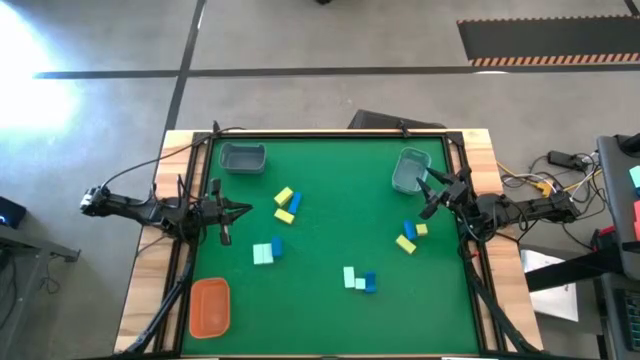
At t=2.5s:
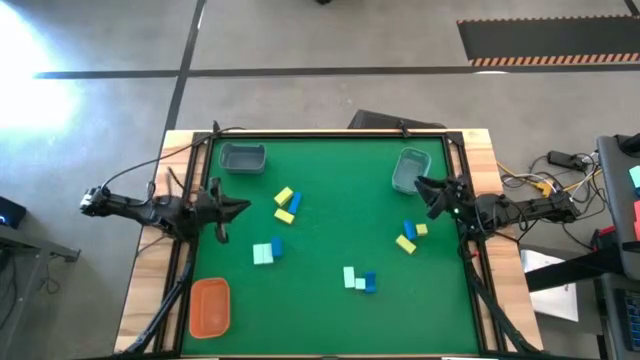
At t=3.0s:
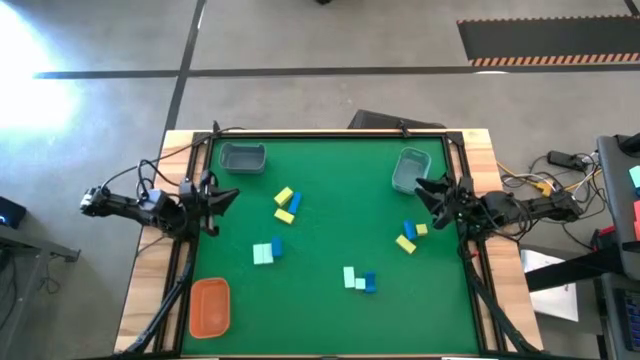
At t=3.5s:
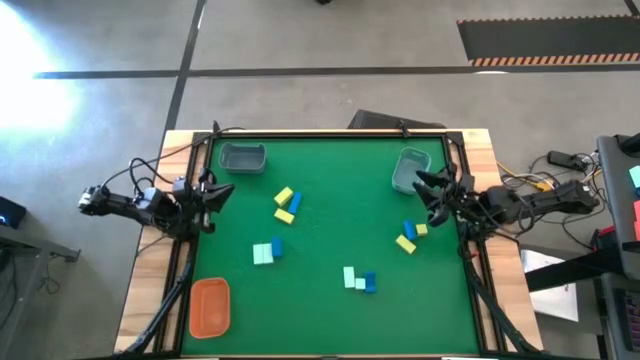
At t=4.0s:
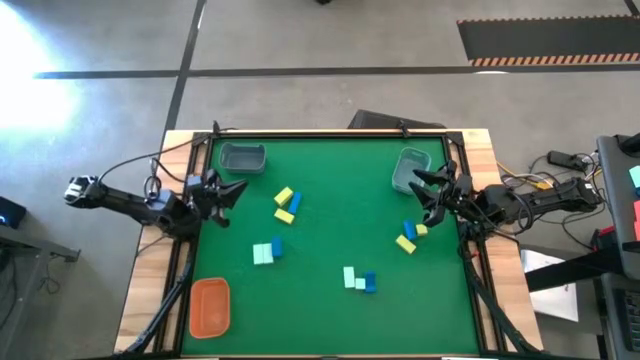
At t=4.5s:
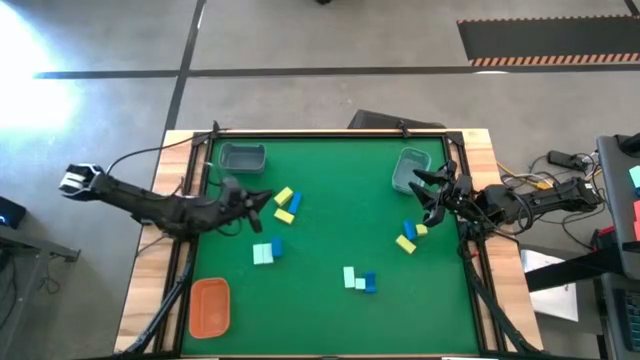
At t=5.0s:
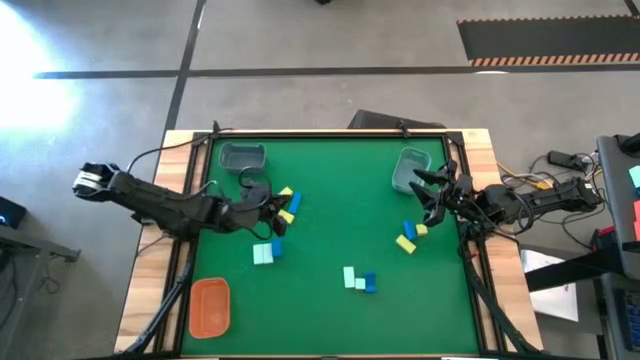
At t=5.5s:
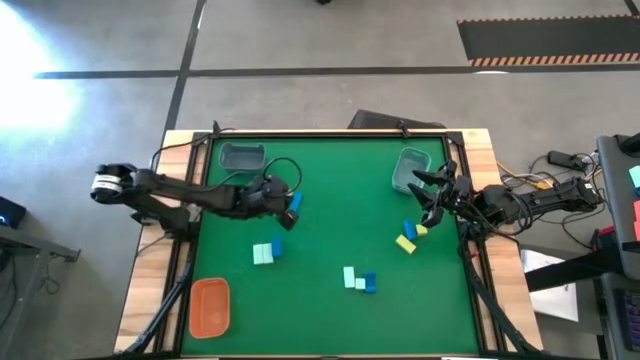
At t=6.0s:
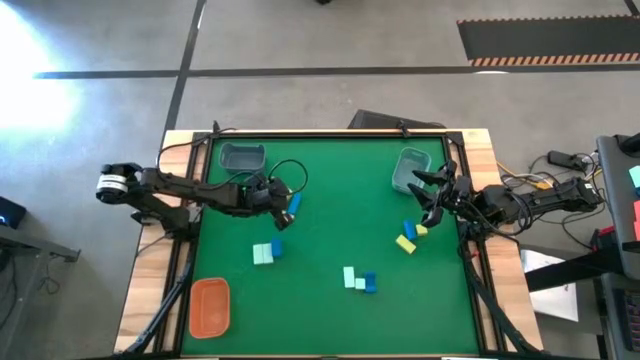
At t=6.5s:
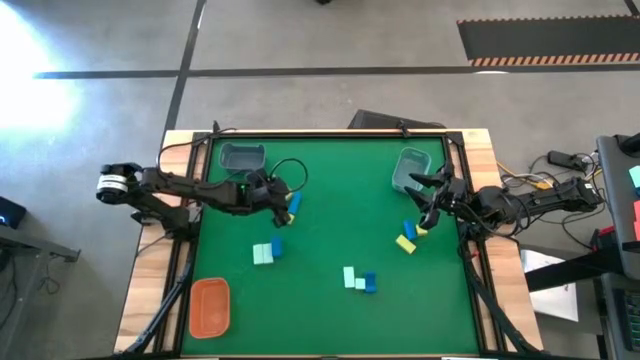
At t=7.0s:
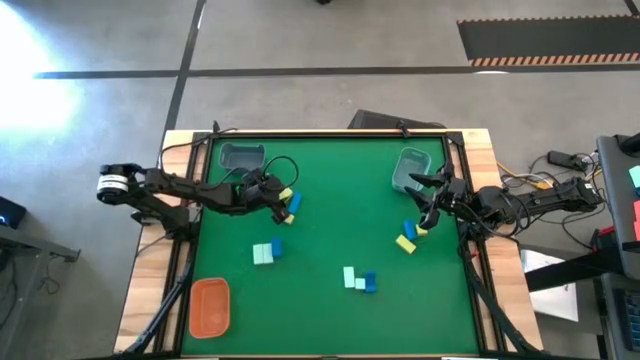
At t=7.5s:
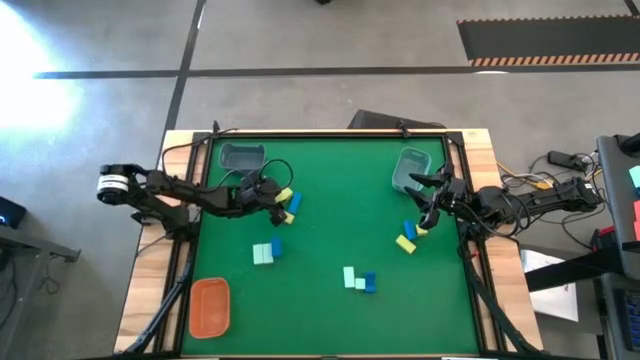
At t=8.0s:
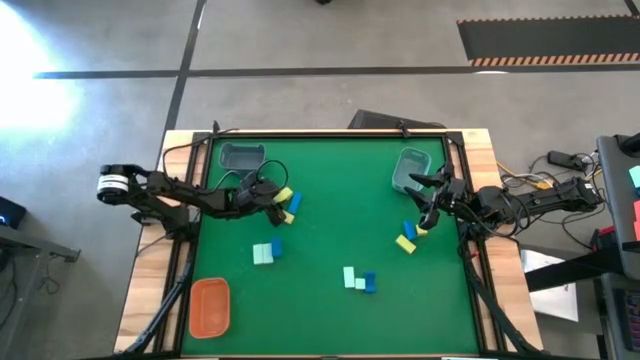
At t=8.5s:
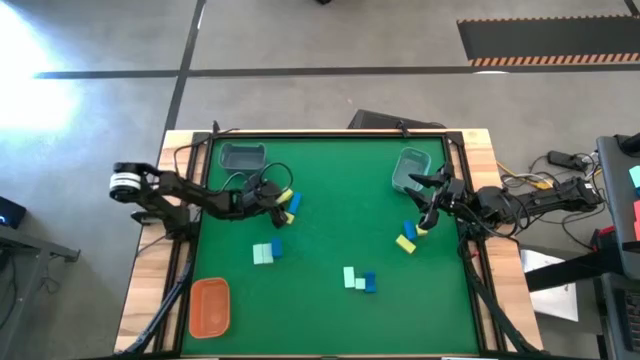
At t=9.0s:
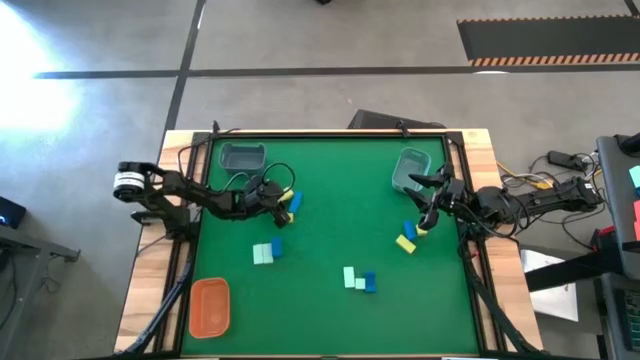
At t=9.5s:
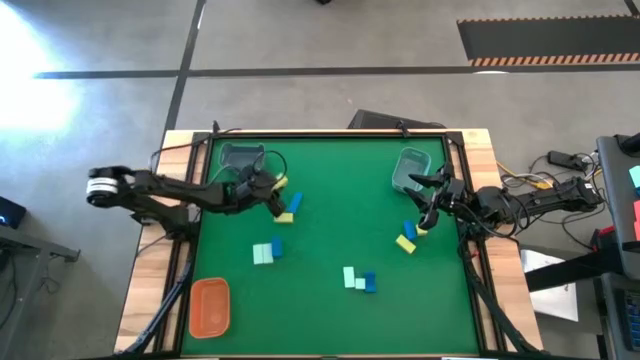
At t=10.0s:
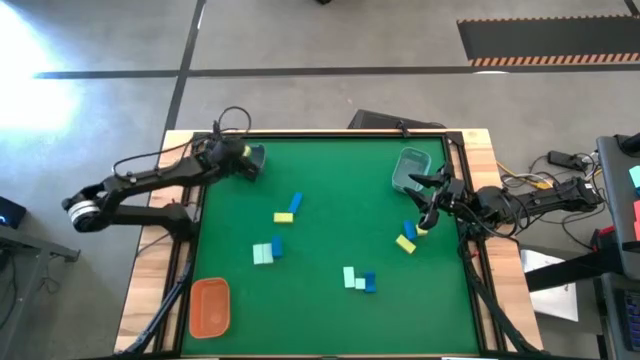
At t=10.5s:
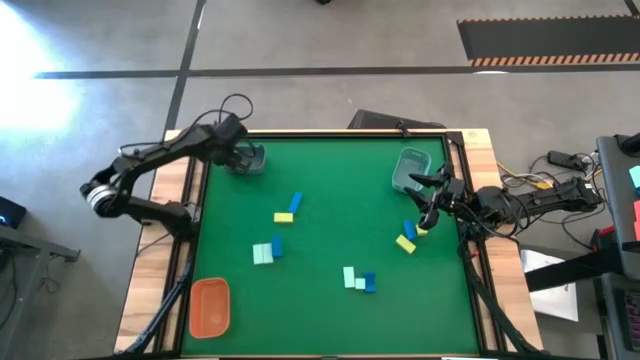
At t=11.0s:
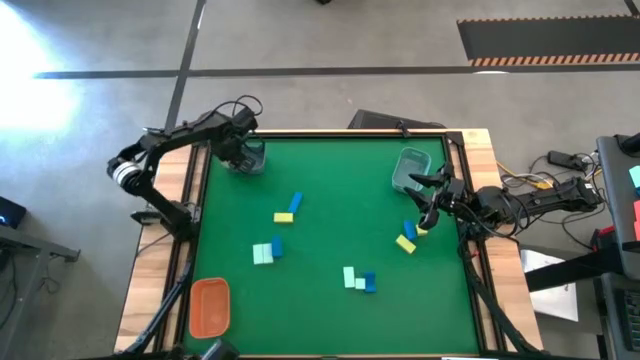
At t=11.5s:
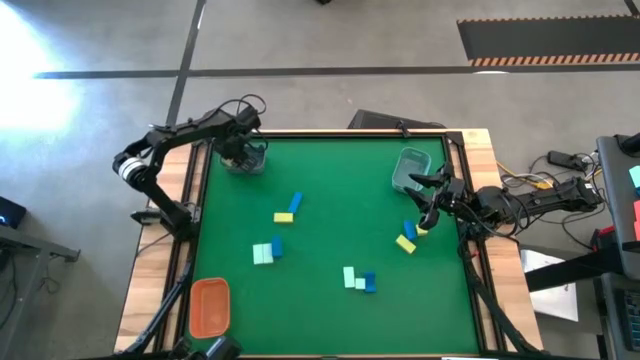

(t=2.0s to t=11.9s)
Task: Sort & place blocks by color
Put the yellow block into the blue bin

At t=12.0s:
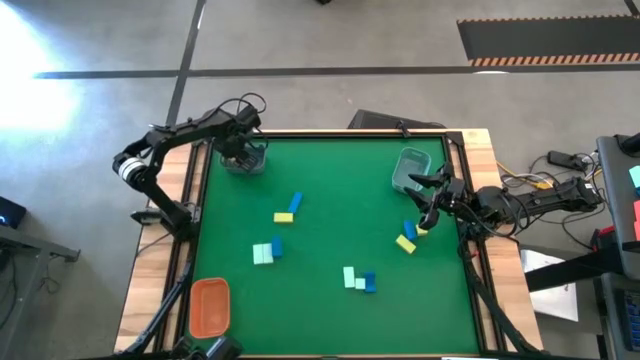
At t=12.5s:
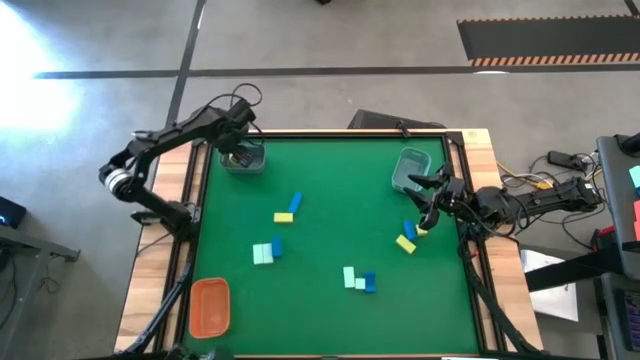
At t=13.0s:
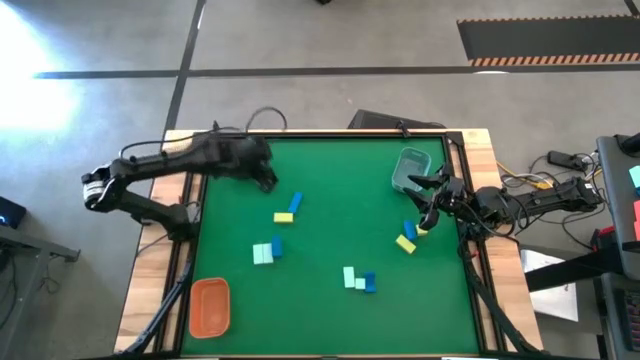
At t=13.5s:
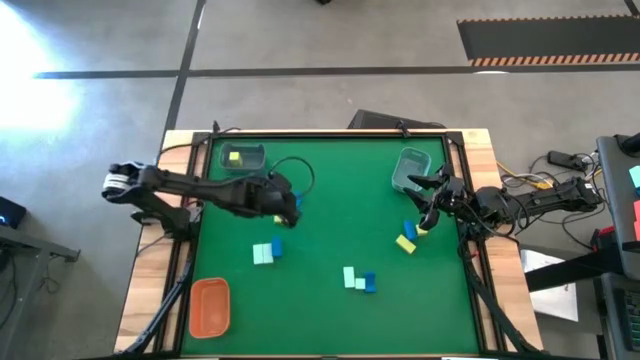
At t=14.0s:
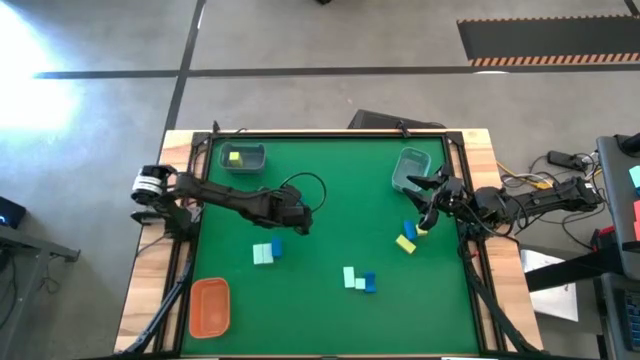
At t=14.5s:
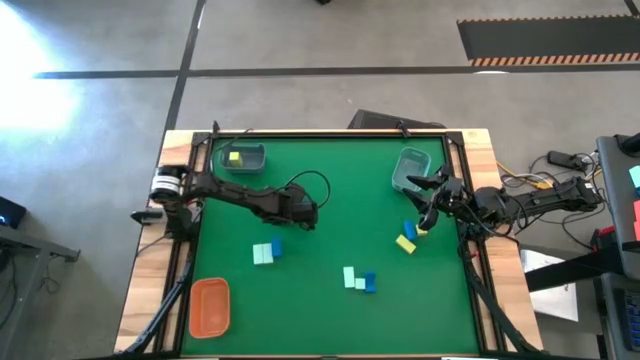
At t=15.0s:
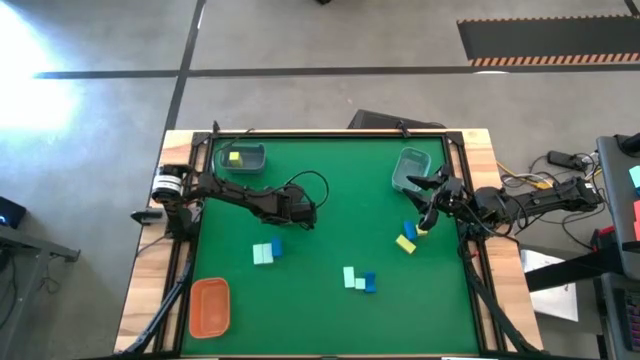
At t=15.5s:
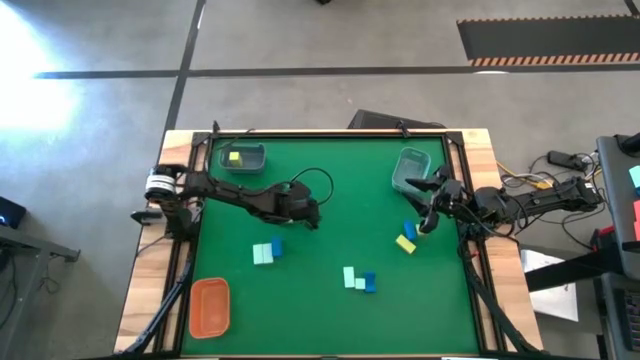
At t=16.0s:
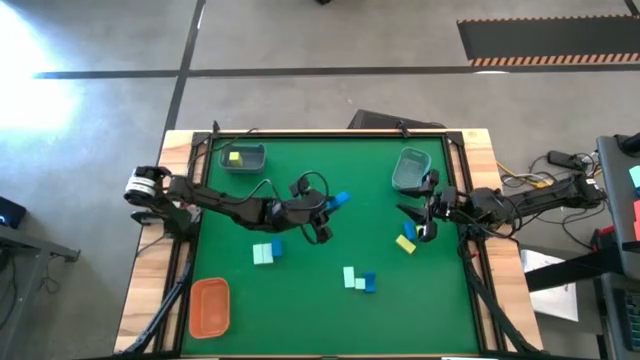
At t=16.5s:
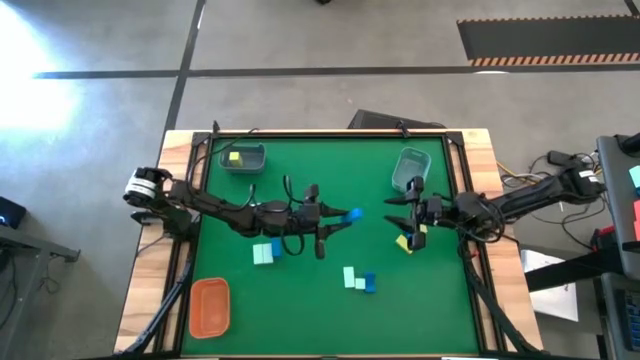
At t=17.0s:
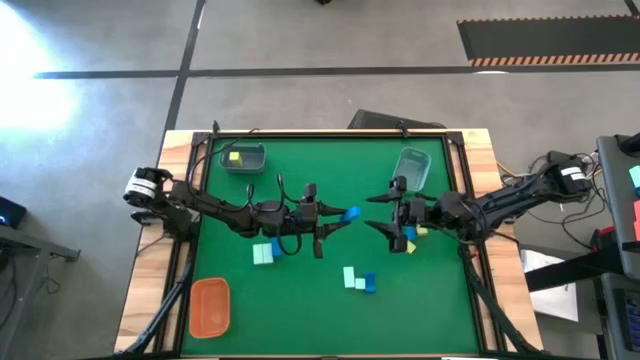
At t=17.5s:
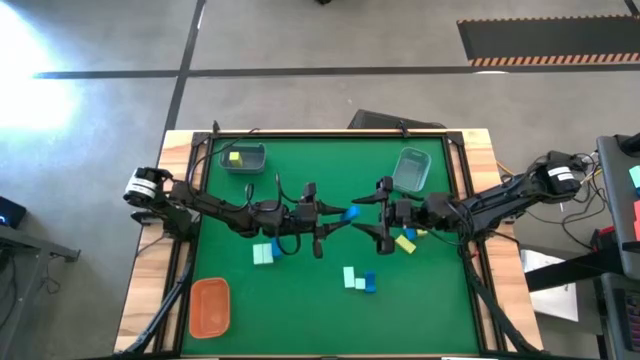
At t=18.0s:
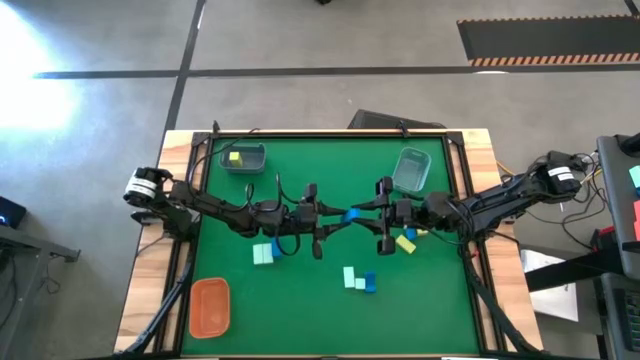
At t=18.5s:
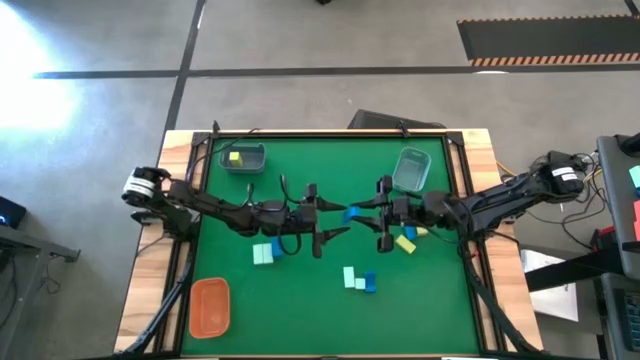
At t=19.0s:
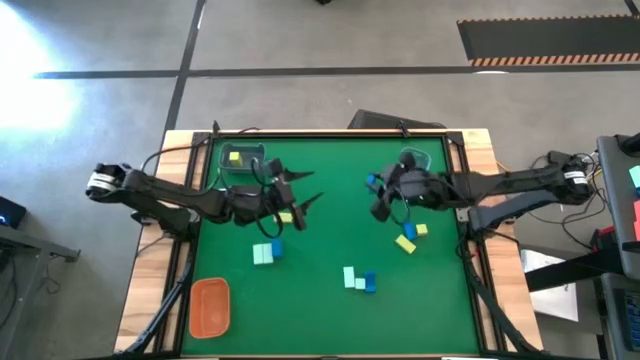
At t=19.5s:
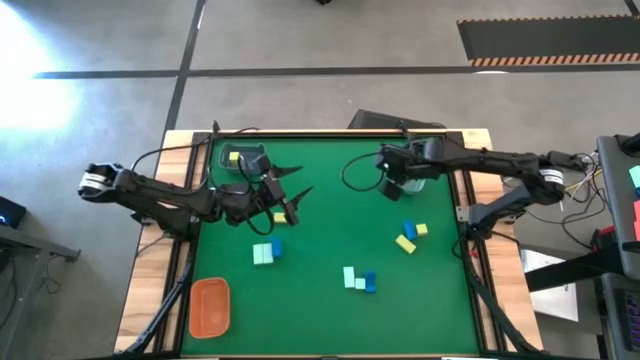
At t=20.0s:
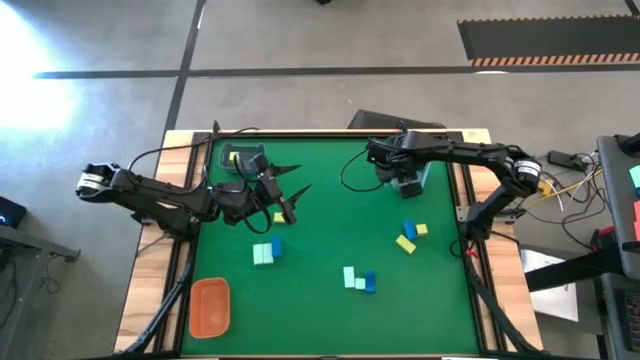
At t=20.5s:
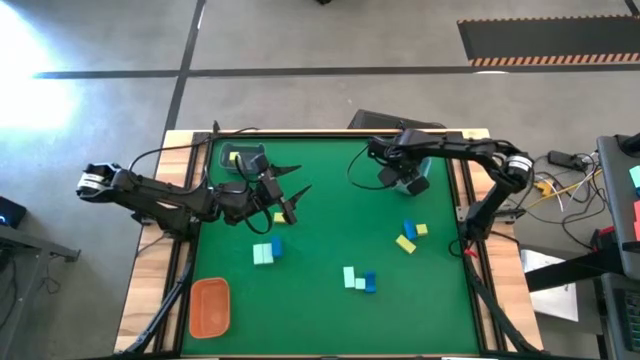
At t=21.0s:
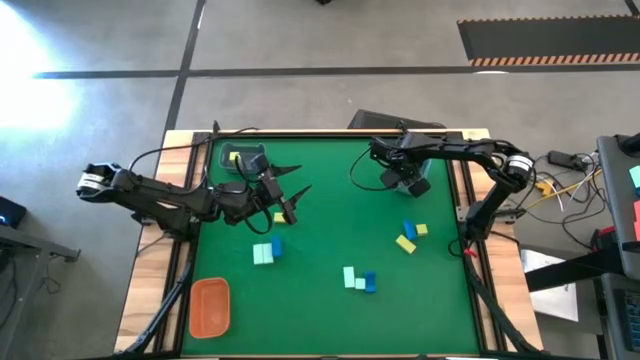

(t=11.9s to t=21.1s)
Put the blue block into the light blue bin
